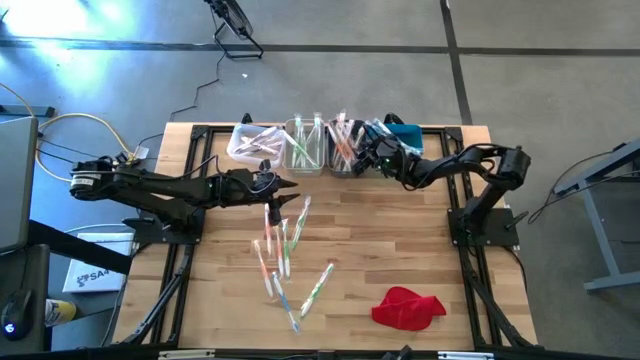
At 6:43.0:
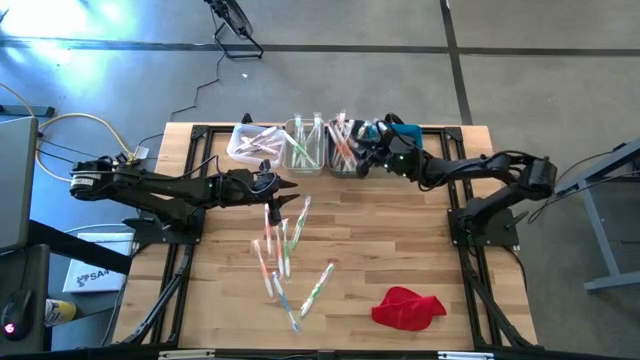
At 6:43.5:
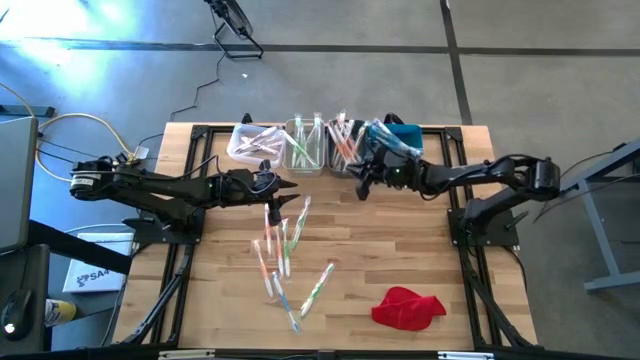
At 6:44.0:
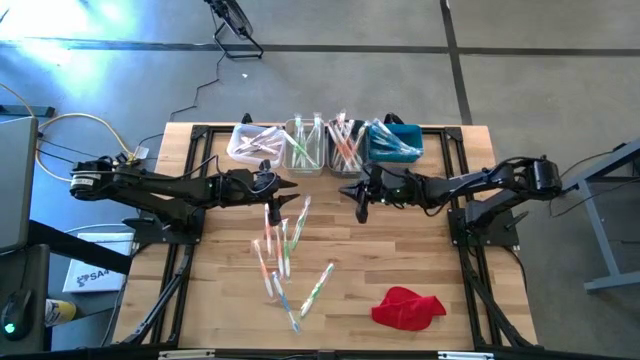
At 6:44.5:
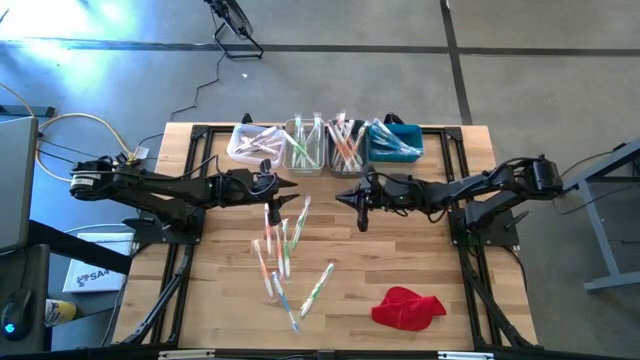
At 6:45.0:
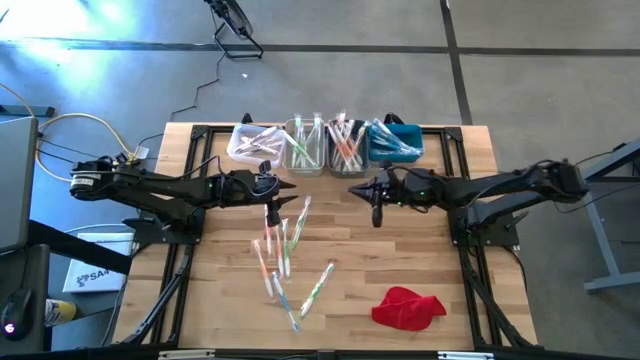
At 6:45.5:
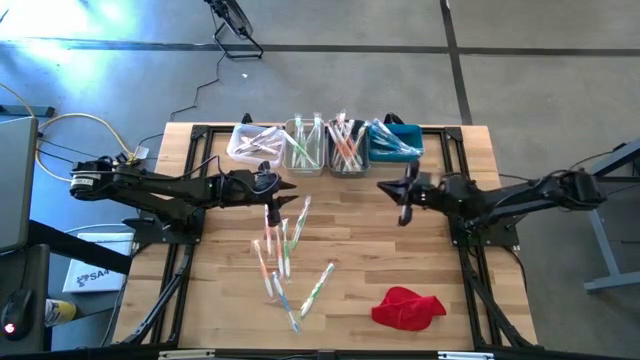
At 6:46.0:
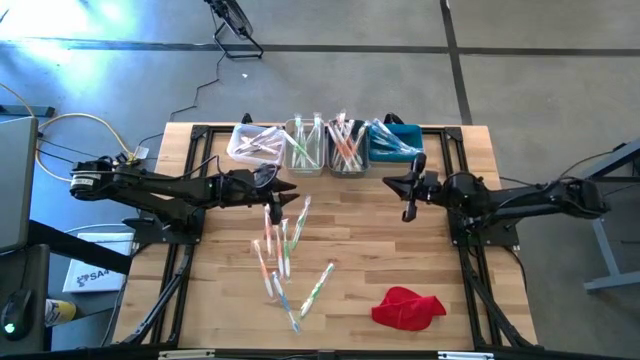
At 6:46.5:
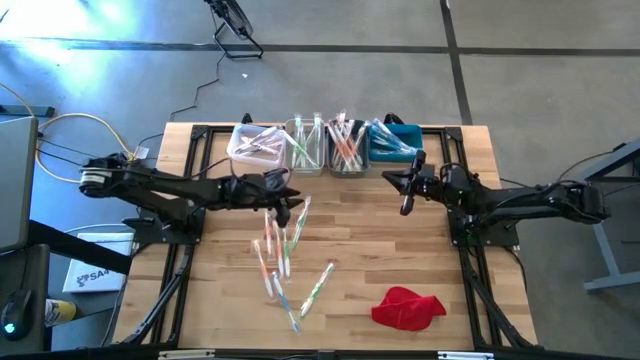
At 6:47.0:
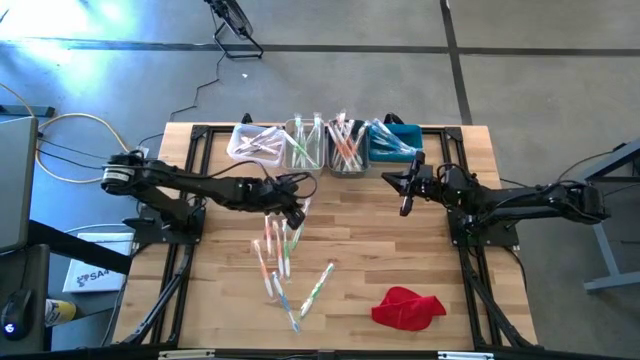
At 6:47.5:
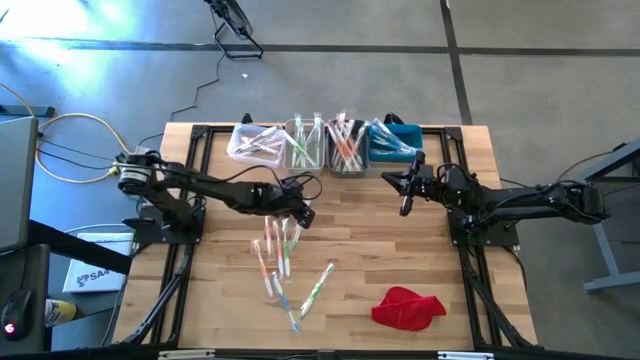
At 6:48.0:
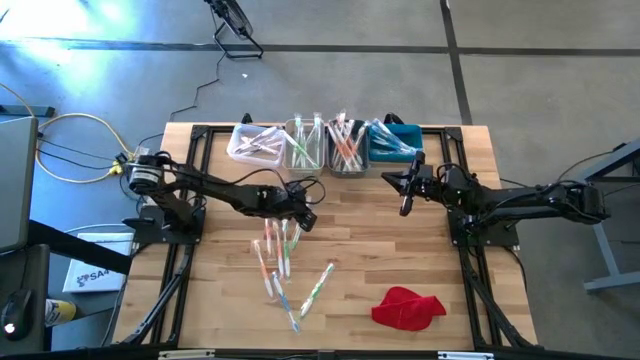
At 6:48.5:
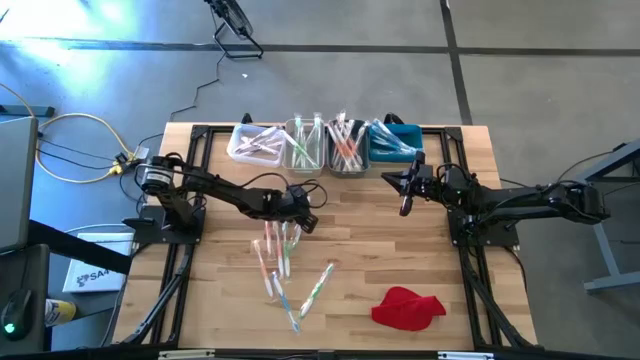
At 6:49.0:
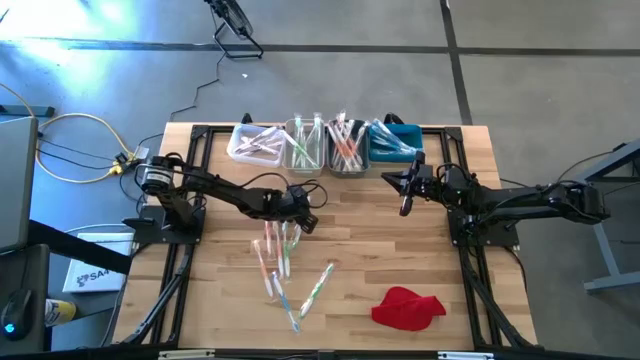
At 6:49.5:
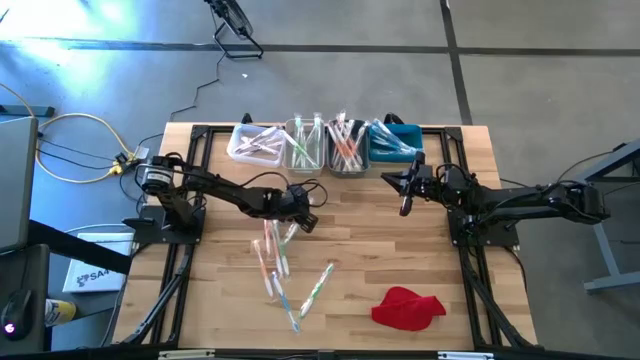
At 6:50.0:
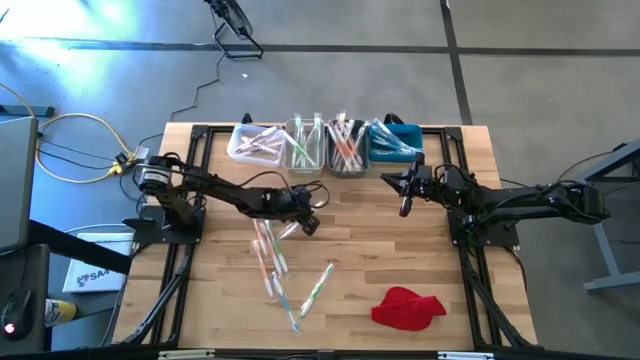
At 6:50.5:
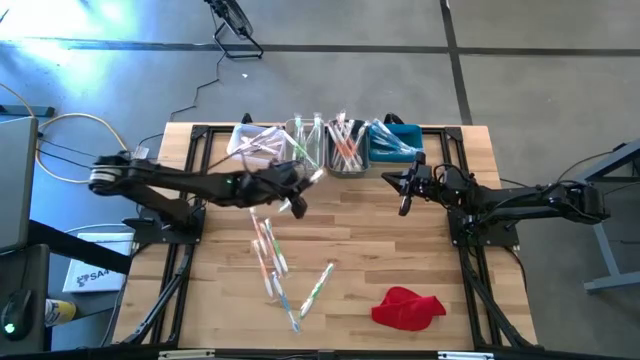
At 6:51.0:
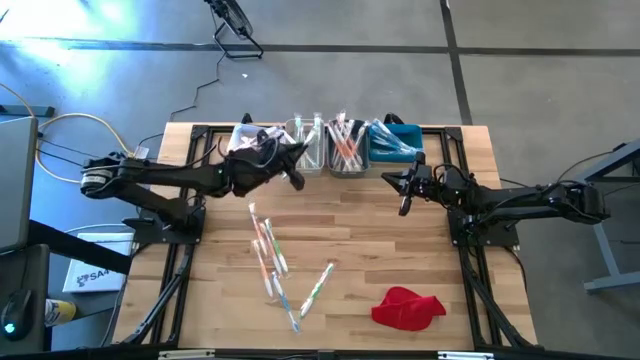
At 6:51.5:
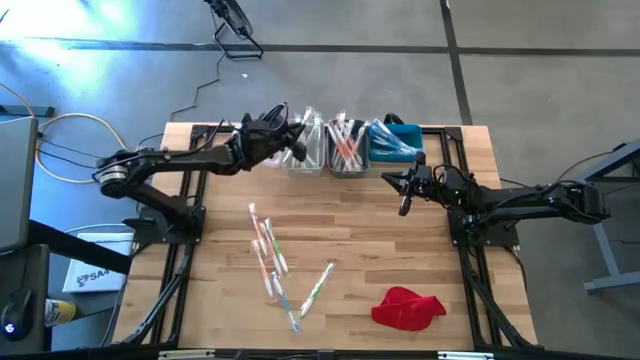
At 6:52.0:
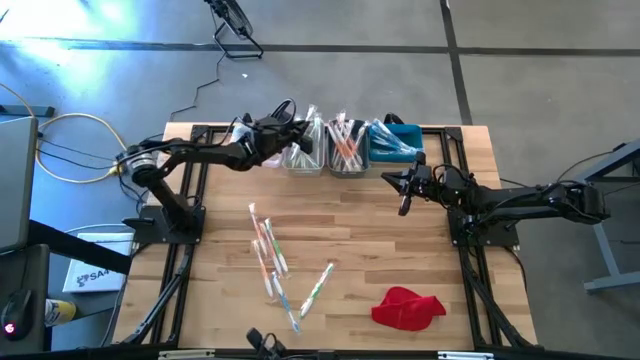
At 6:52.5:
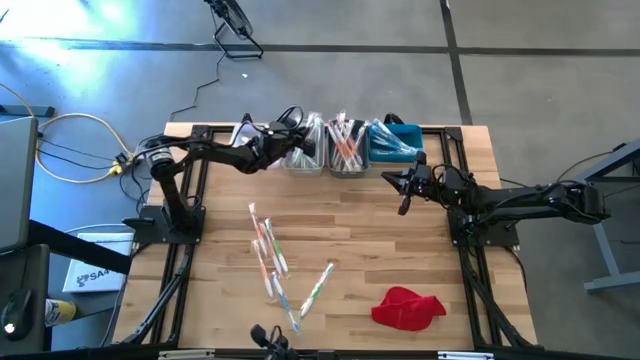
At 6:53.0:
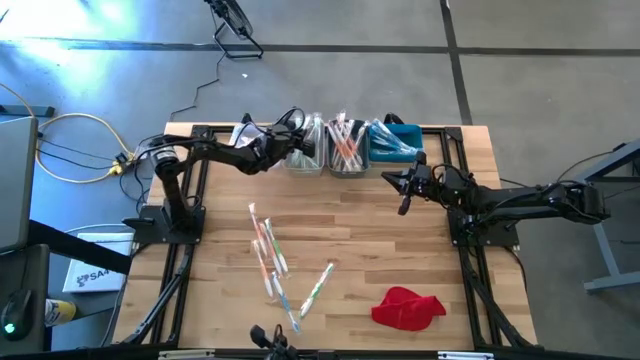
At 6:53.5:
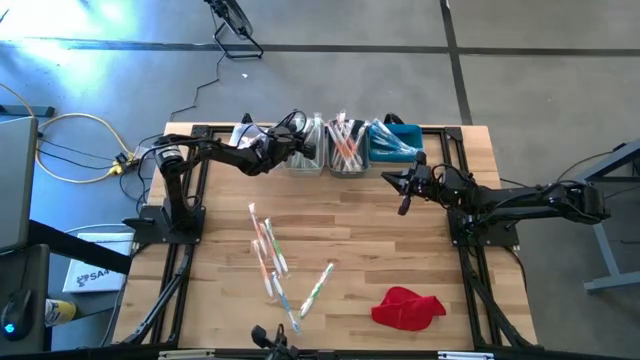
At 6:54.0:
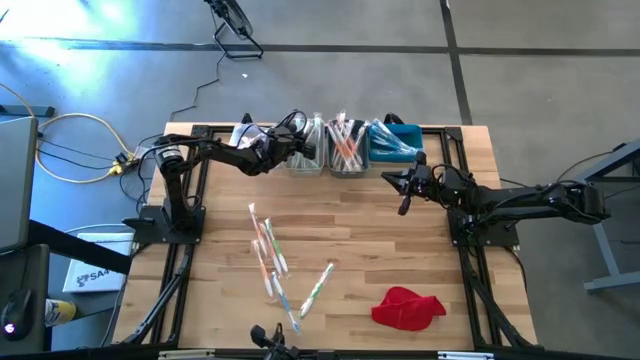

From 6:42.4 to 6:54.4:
Task: Pick & Place Toothbrushes
Put the green toothbrush into the gray bin

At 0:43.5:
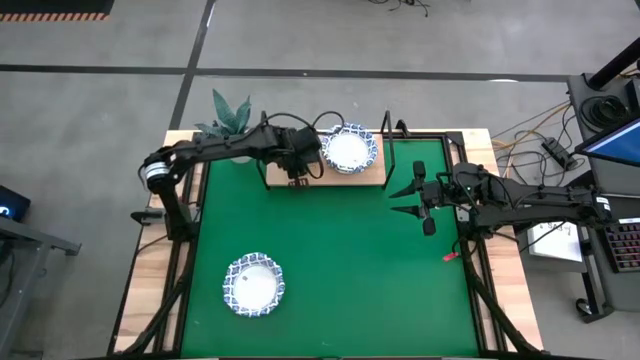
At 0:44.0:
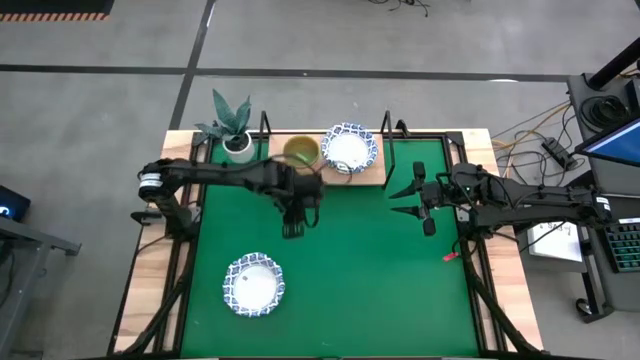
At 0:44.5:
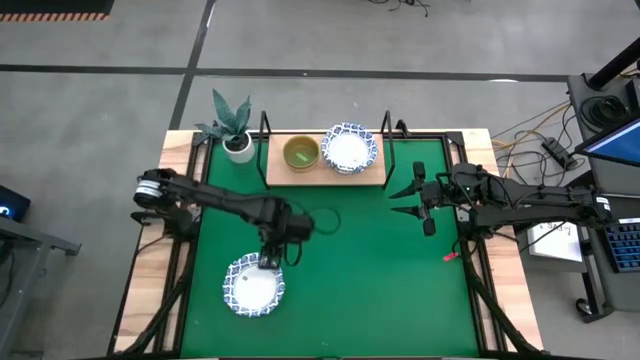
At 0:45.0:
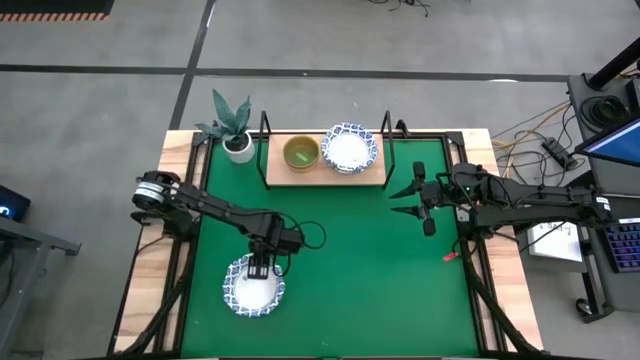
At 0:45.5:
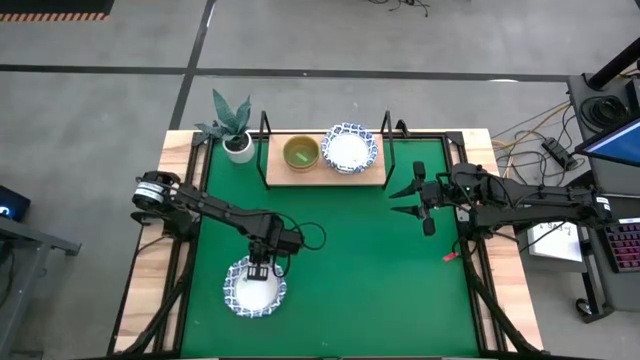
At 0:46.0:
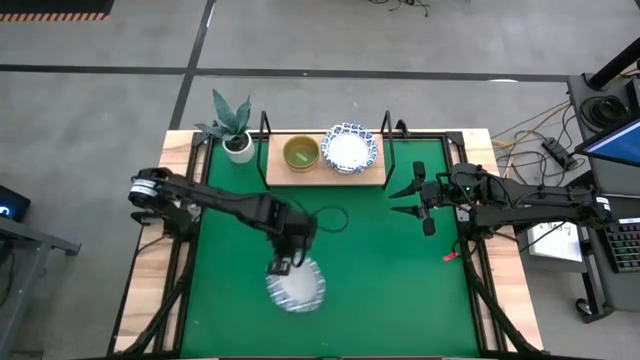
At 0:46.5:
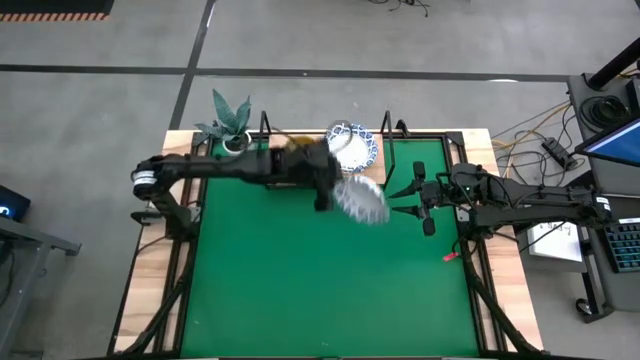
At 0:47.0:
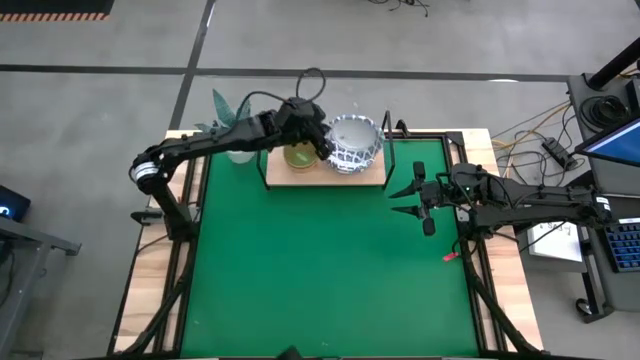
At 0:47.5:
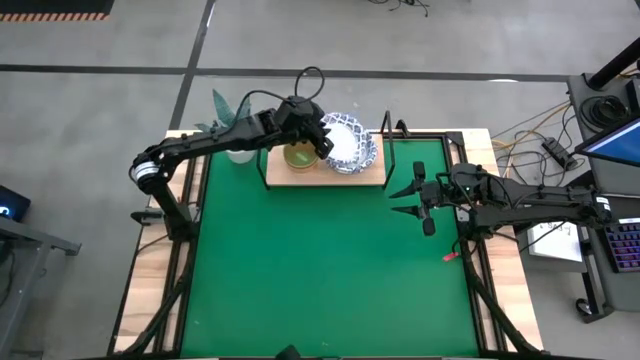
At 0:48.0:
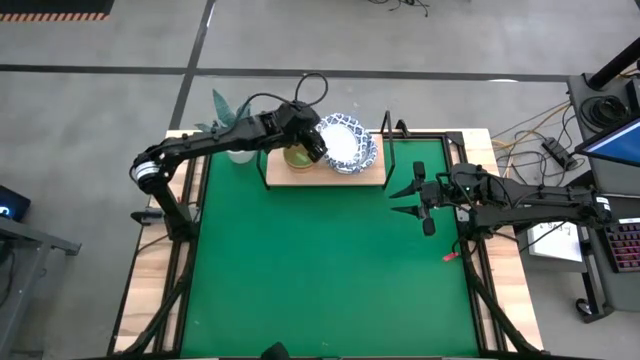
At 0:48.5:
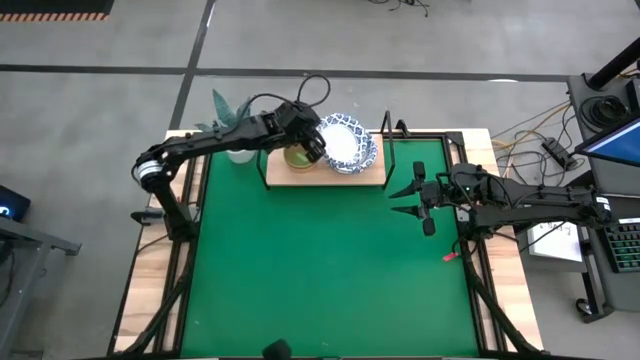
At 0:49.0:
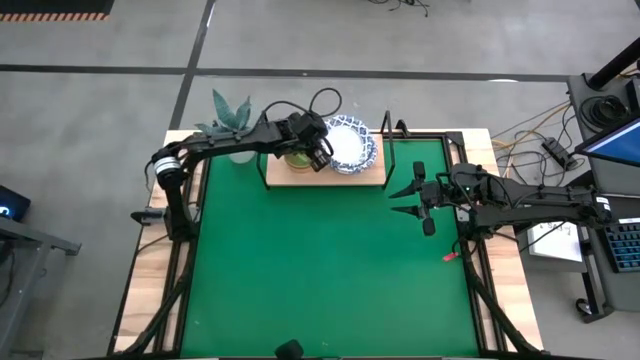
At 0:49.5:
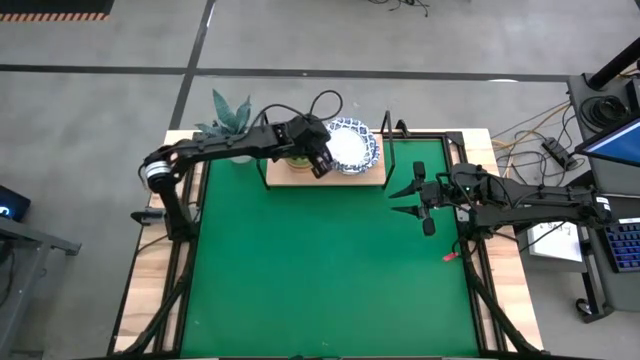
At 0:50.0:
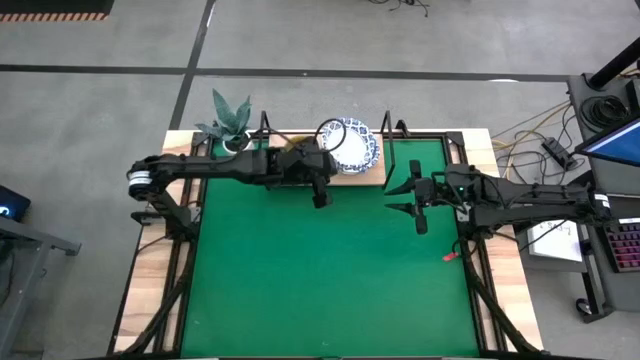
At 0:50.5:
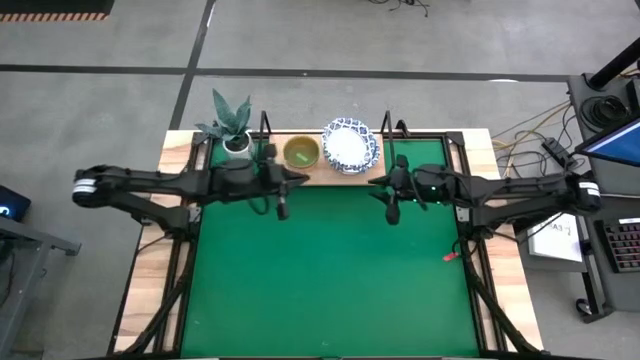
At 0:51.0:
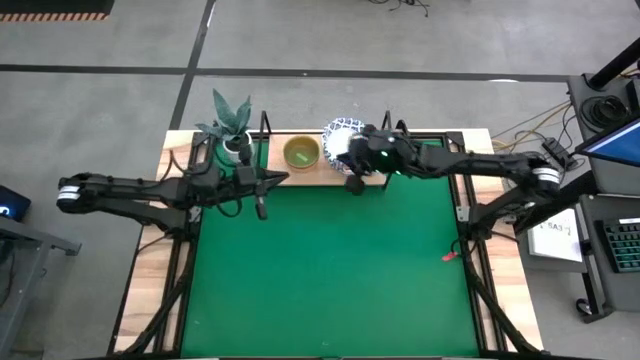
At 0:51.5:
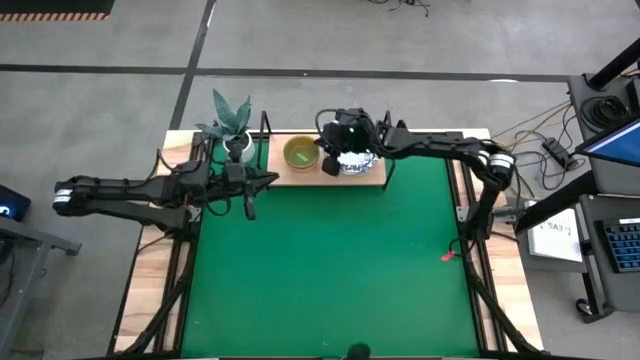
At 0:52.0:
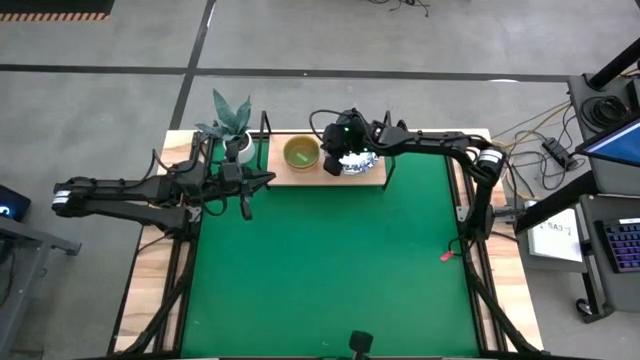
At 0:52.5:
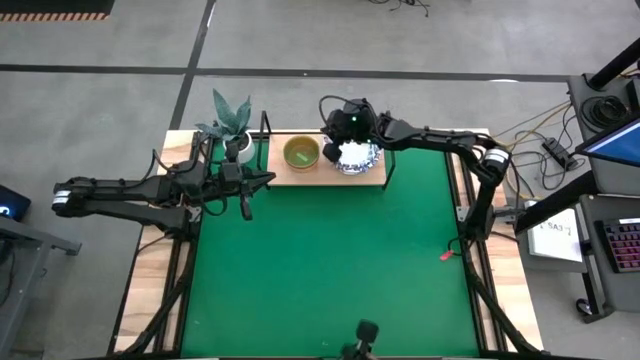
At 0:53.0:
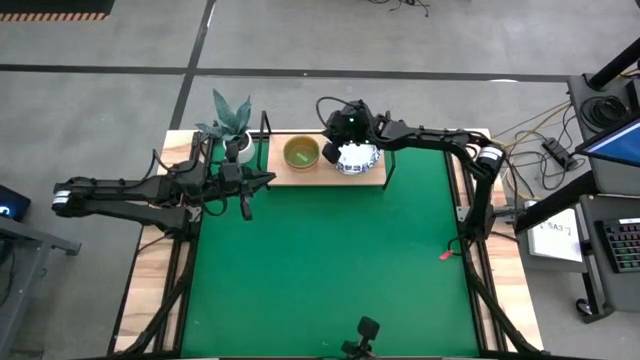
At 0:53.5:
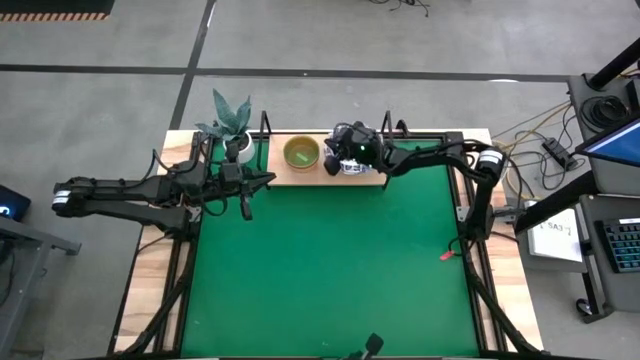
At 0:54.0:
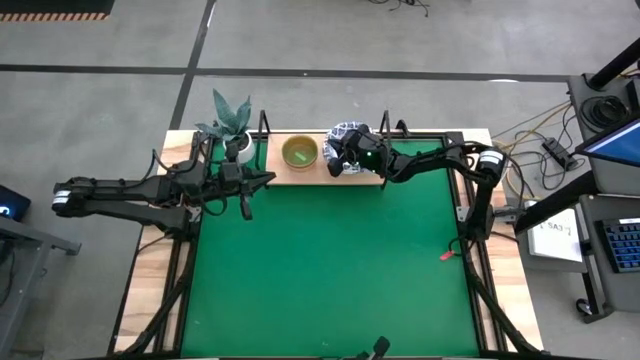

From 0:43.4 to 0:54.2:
Task: Place and stack bowls onto a shelf
Stack the blue patterned bowl on top of the other blue patterned bowl on the shelf
